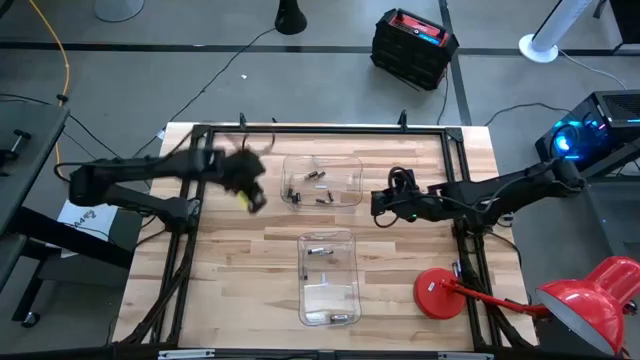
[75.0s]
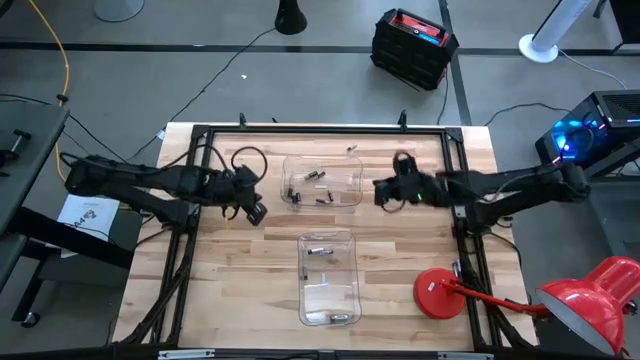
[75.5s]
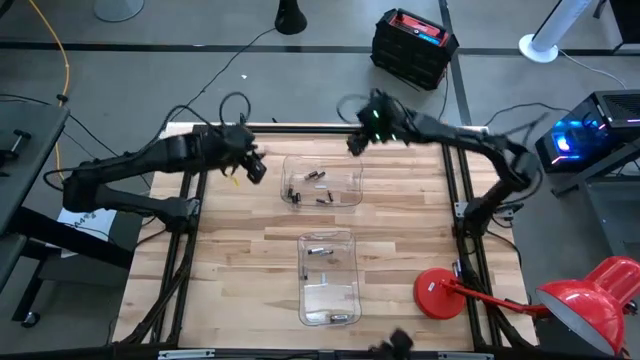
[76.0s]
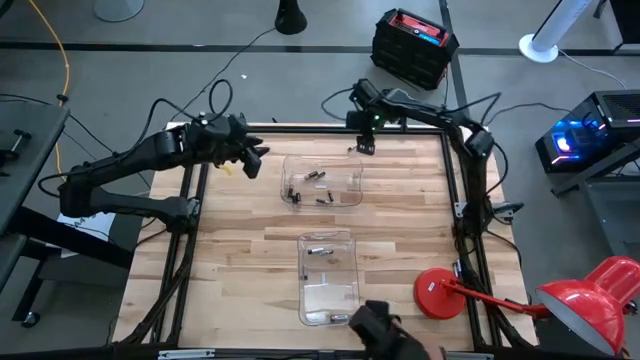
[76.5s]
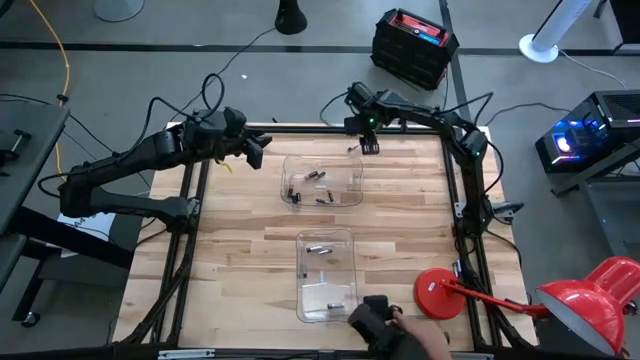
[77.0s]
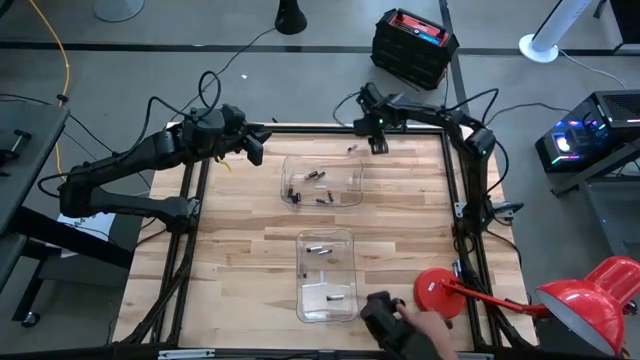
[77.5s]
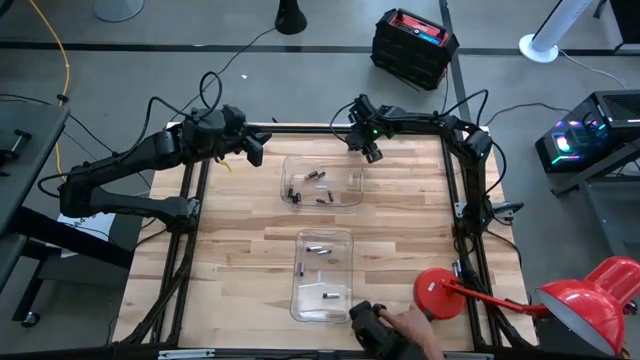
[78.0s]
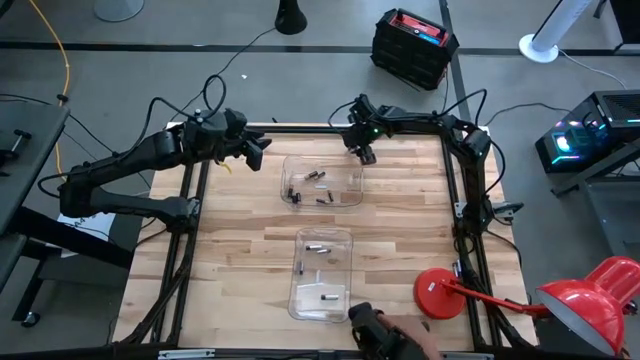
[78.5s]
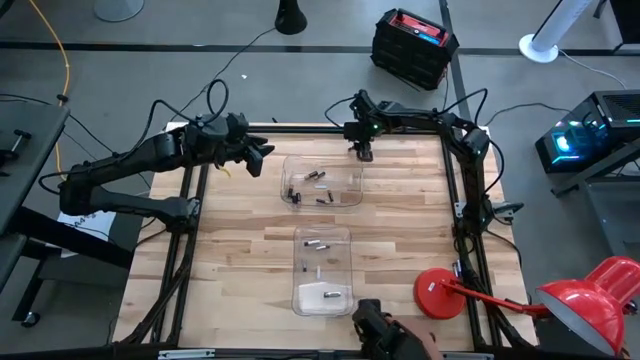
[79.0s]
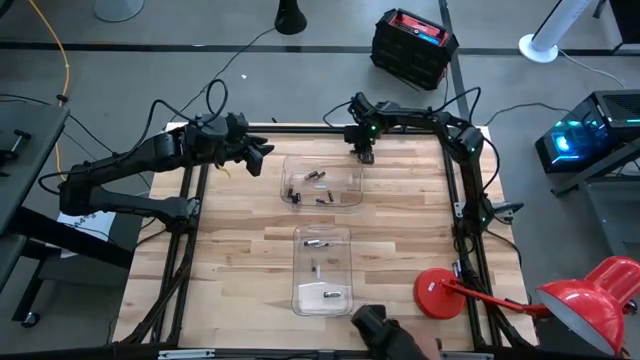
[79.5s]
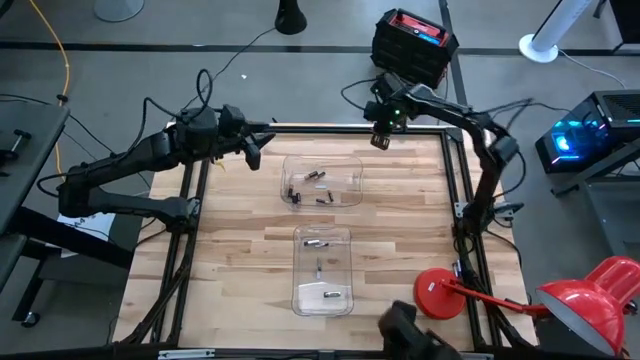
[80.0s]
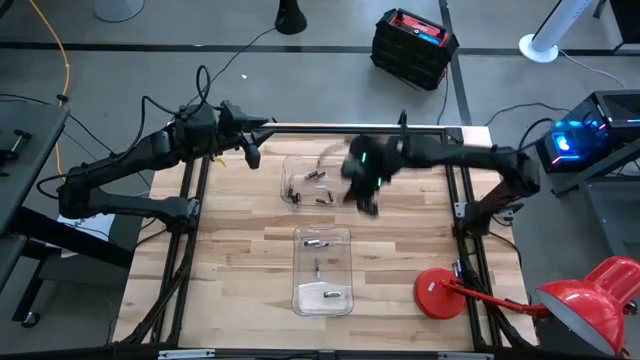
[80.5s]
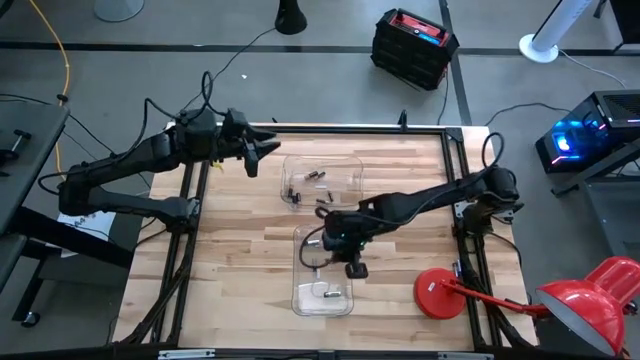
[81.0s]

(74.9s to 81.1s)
Task: Sort batteries
Put the silver battery into the bottom transparent bin

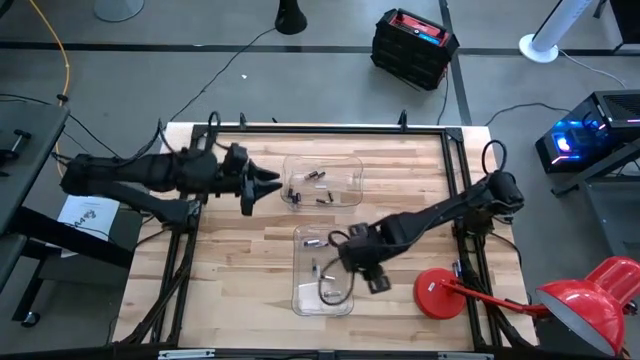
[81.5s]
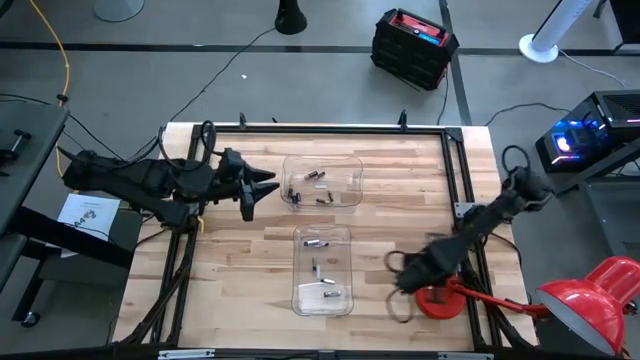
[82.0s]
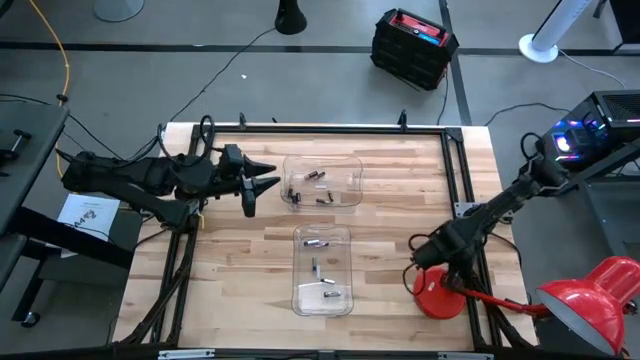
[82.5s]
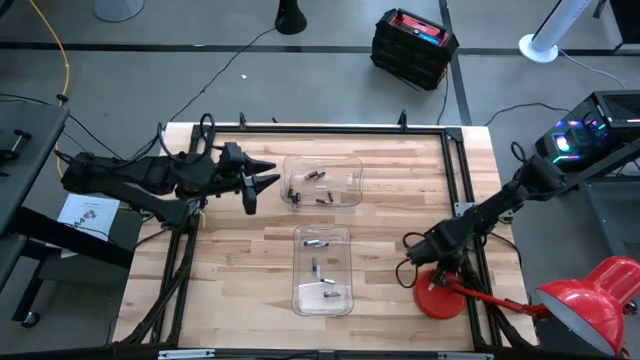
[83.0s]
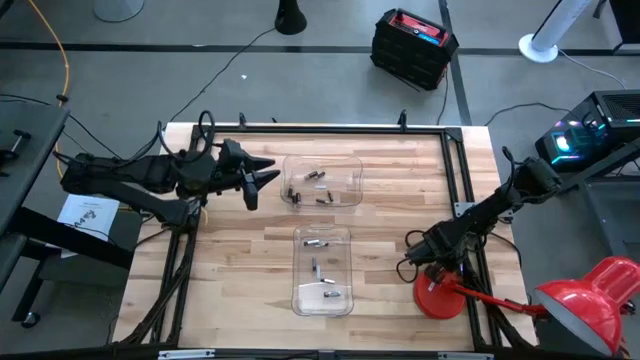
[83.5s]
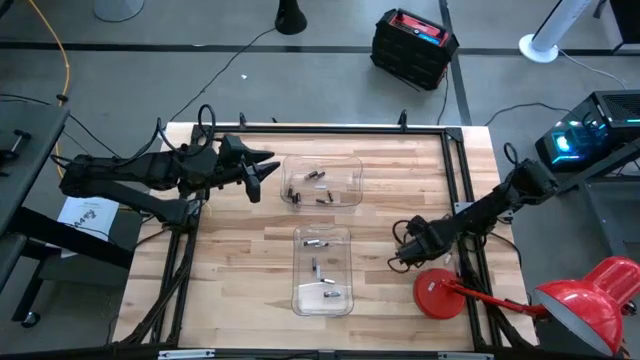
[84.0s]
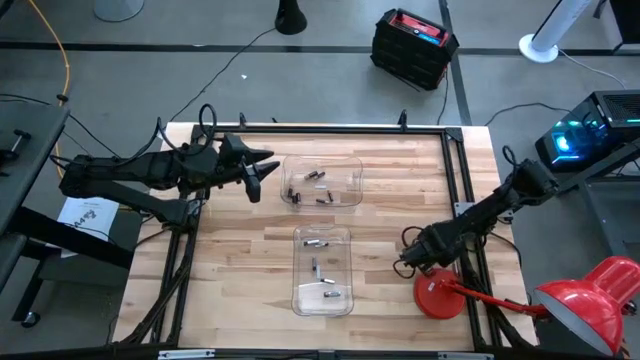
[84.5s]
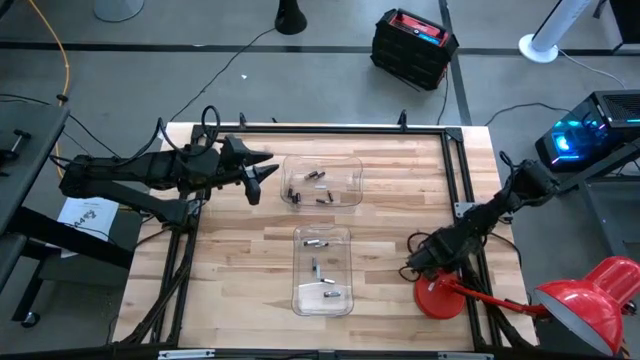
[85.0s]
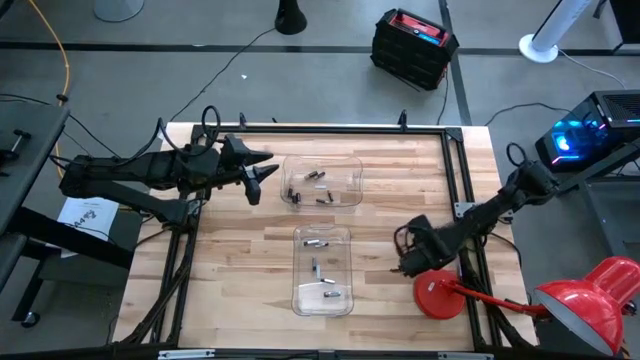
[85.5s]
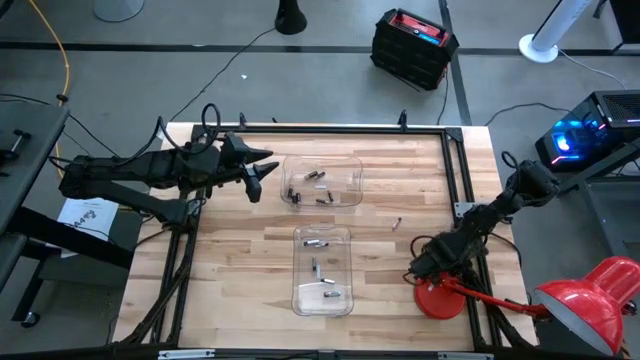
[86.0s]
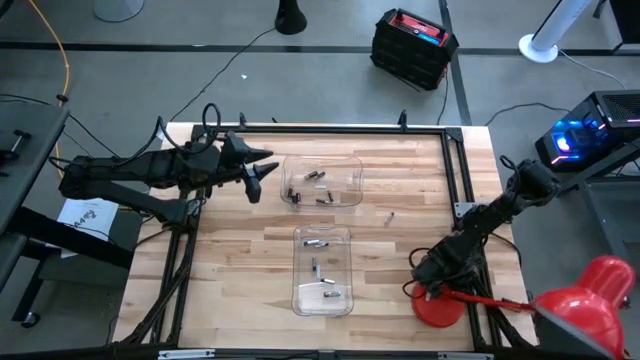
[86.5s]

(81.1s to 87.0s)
Adjust the silver batteries on the table

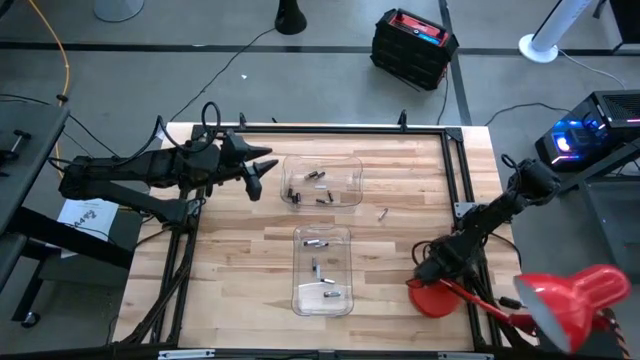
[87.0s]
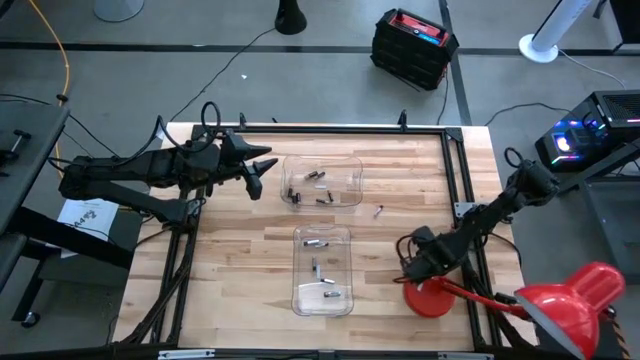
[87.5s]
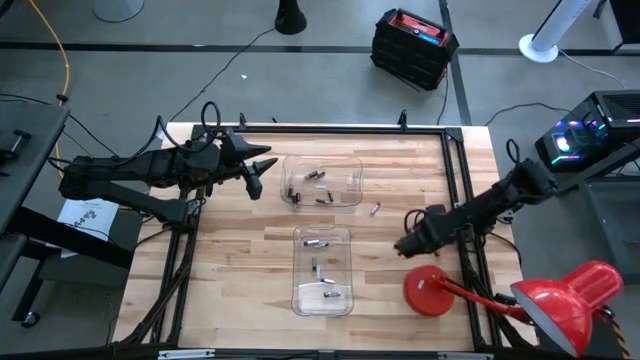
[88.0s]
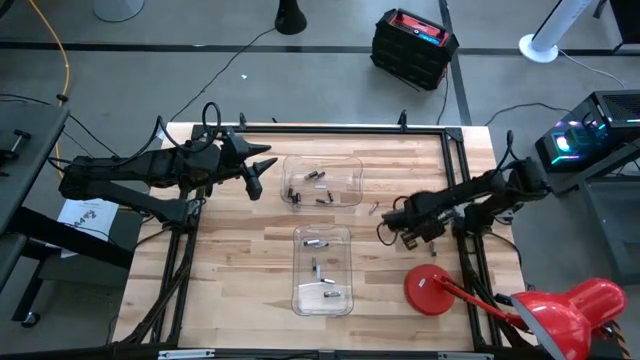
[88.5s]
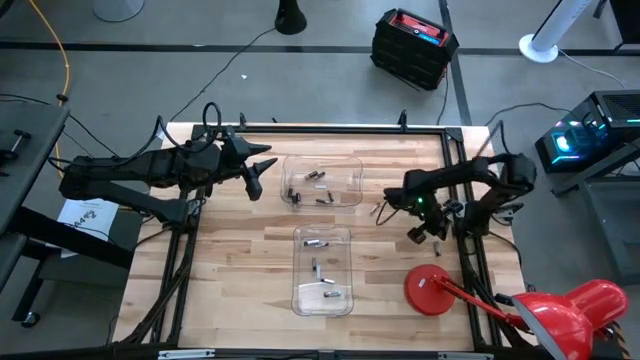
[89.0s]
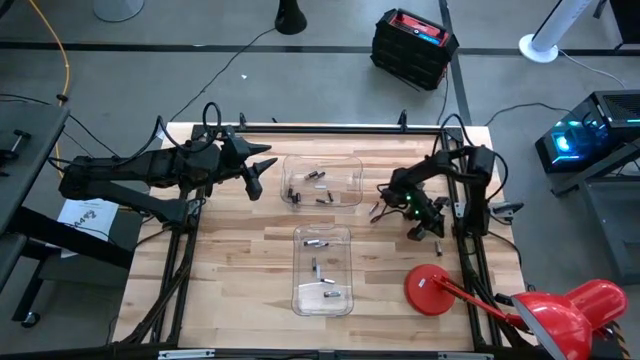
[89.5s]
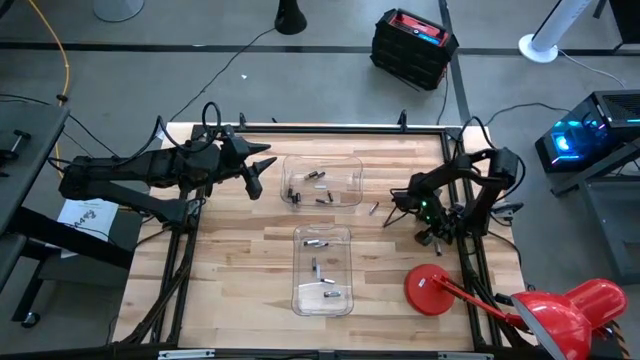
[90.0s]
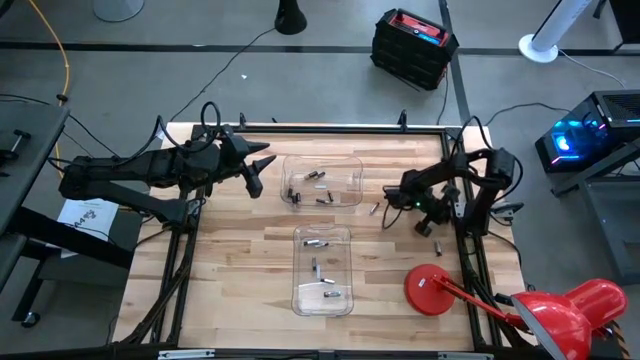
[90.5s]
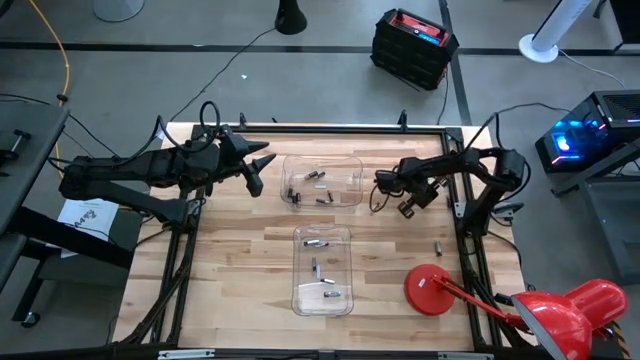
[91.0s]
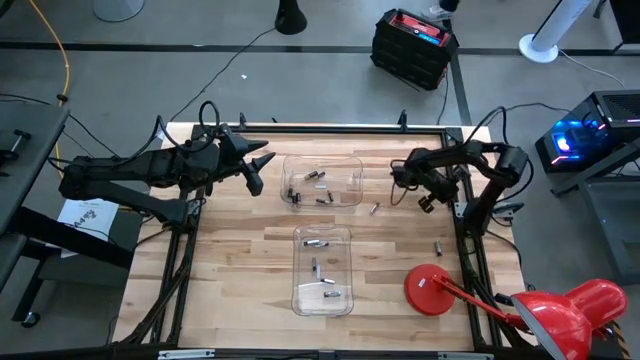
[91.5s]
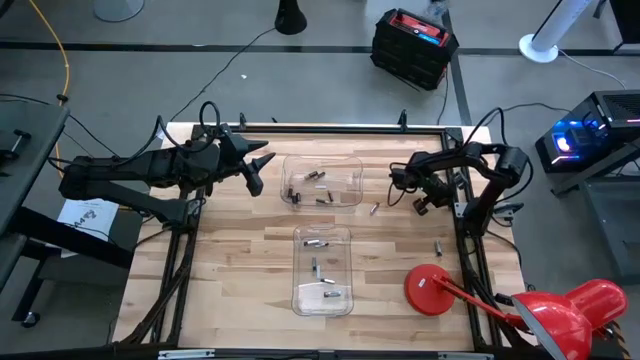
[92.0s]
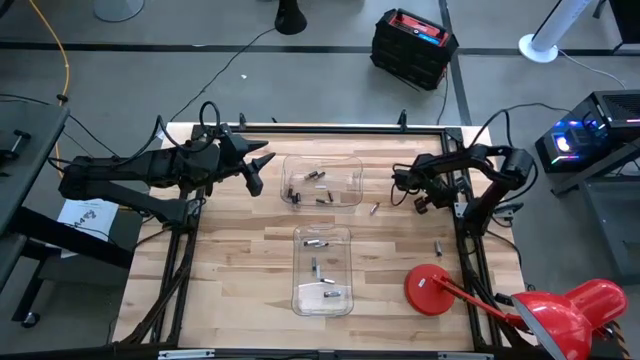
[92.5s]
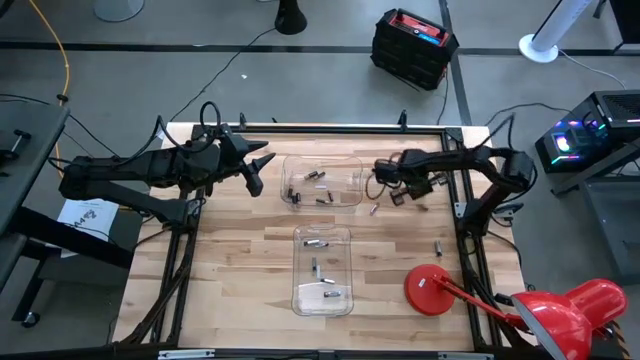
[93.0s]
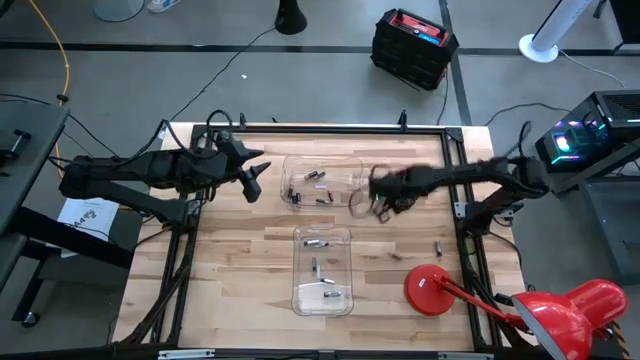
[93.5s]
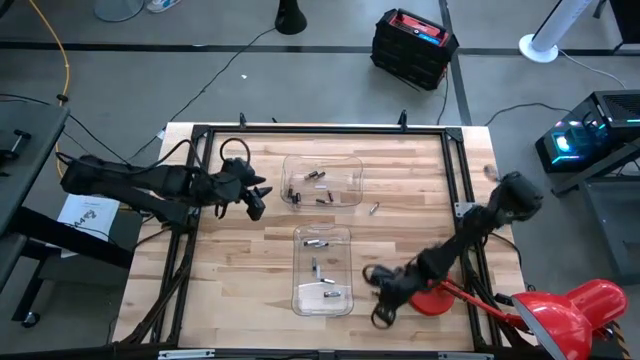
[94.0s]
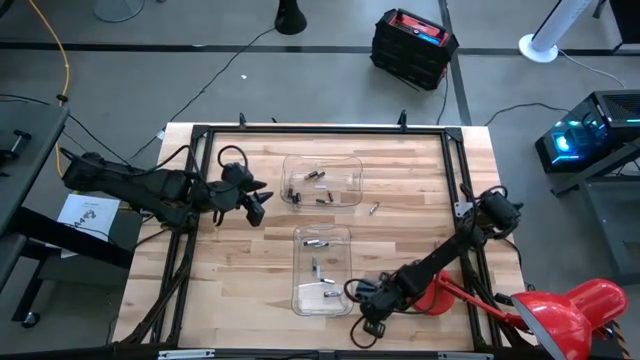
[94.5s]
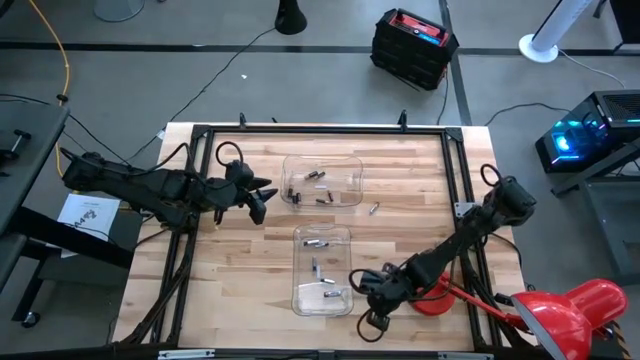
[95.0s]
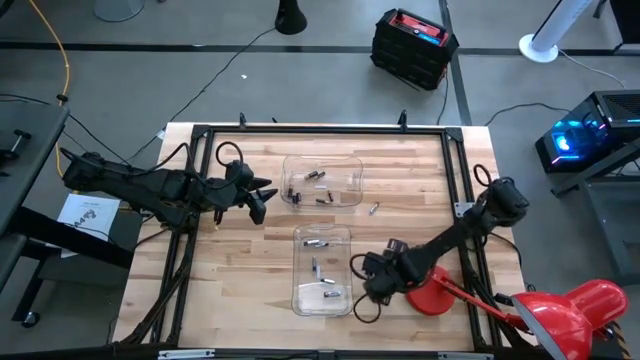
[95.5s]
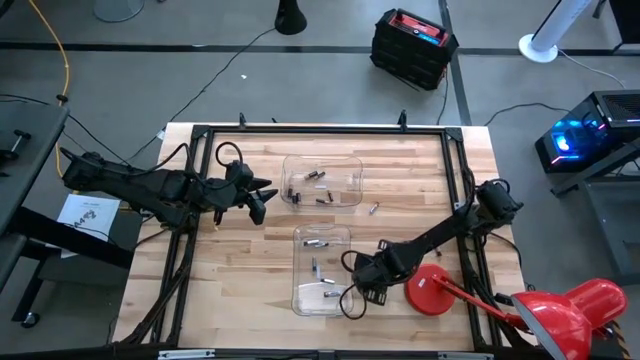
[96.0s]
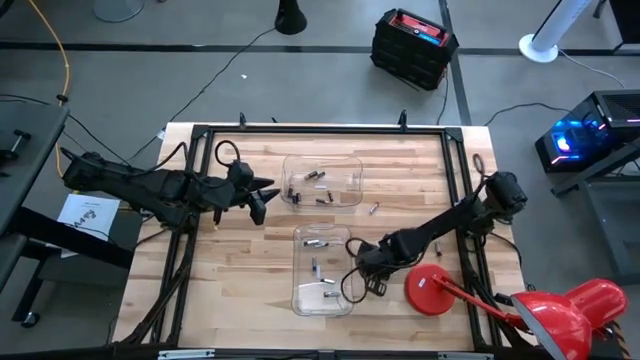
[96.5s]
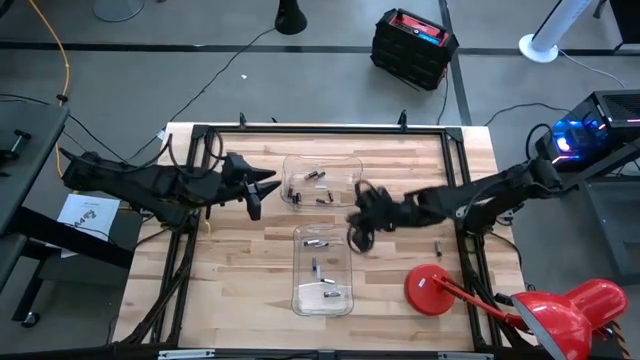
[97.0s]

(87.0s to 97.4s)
Put the black battery into the top transparent bin

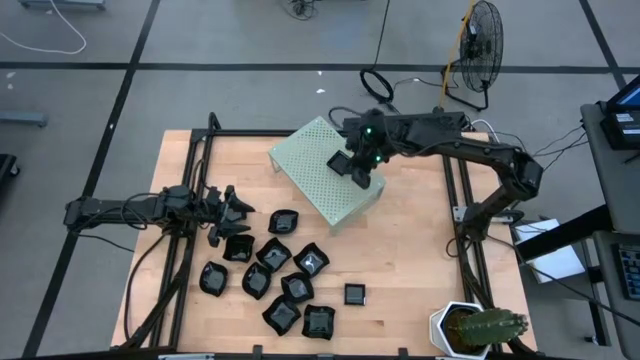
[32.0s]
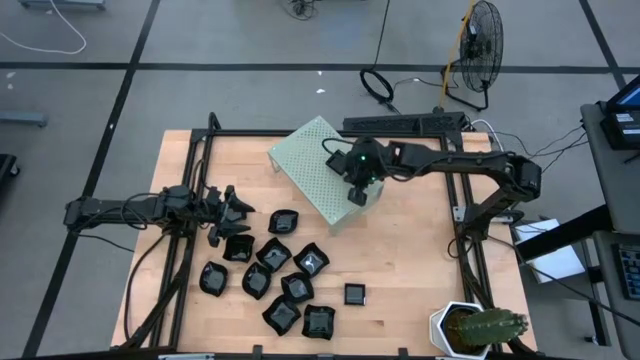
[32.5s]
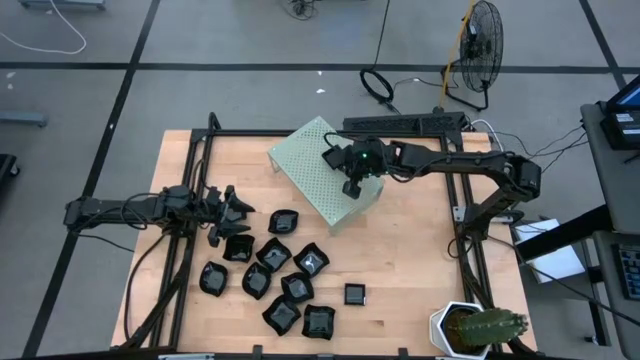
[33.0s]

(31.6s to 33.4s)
Task: Pick & Place Mini shaped plates
Adjust the stacked square plates on the shelf
